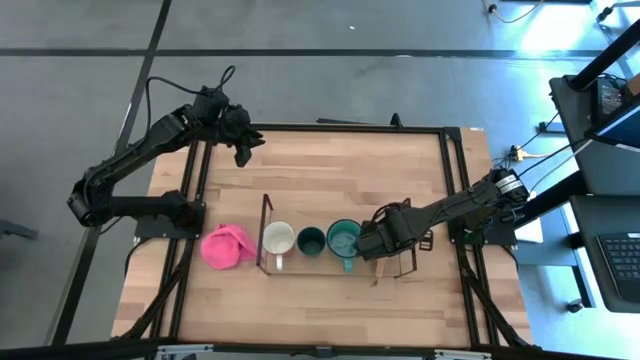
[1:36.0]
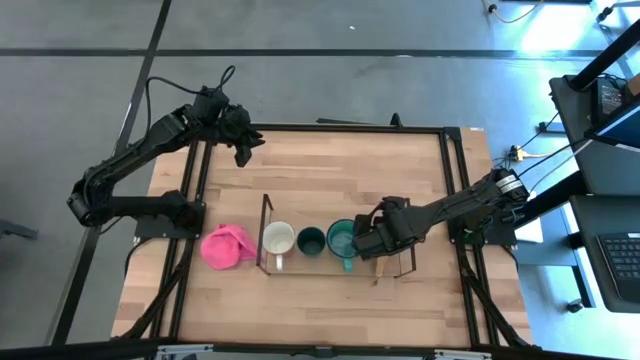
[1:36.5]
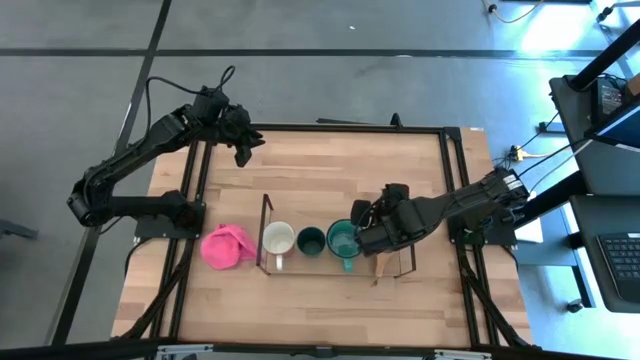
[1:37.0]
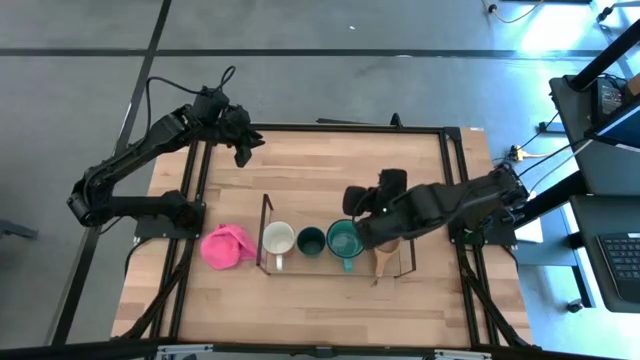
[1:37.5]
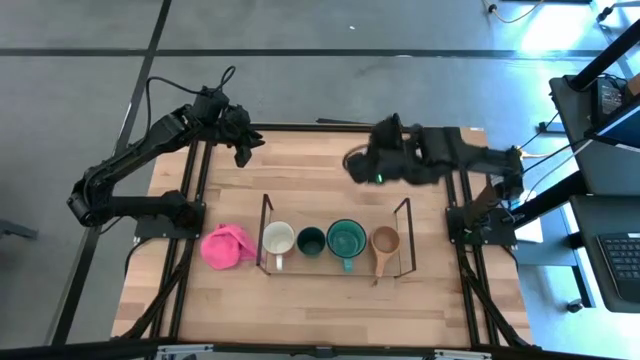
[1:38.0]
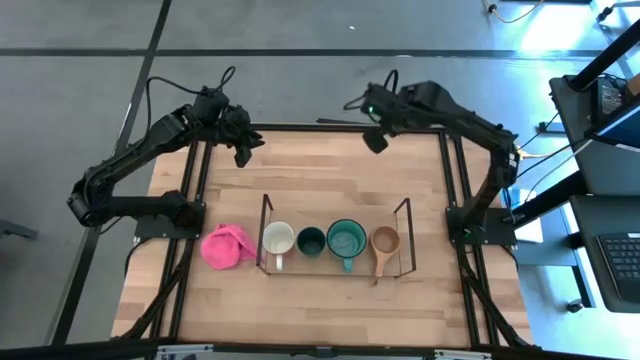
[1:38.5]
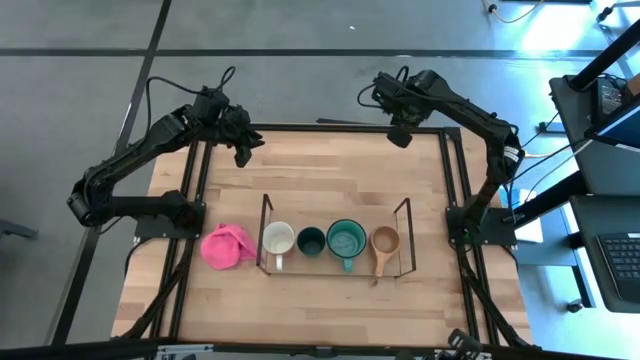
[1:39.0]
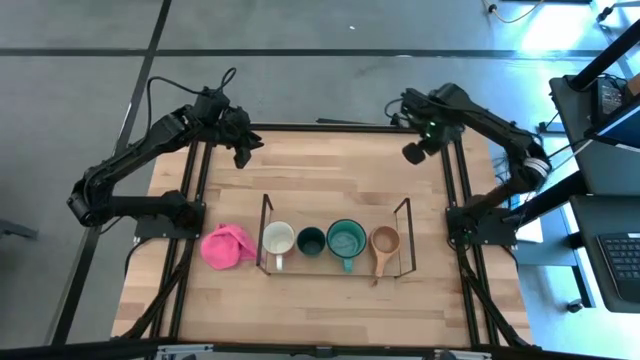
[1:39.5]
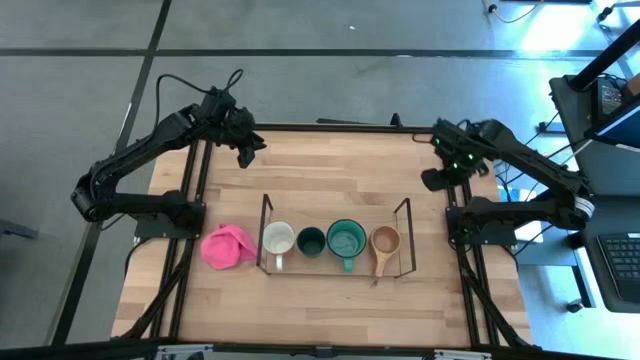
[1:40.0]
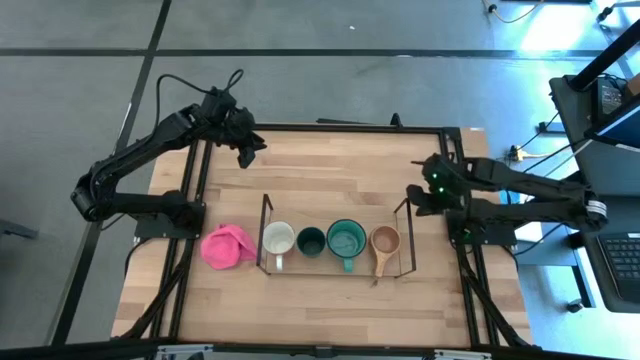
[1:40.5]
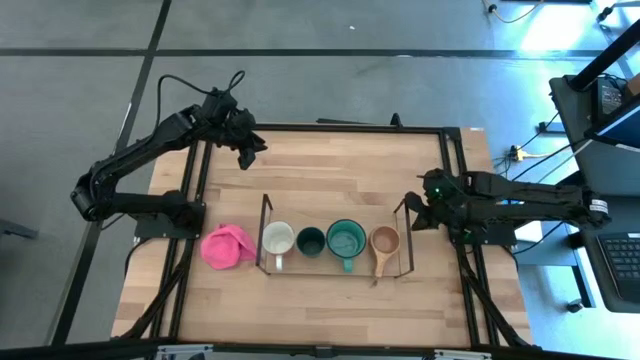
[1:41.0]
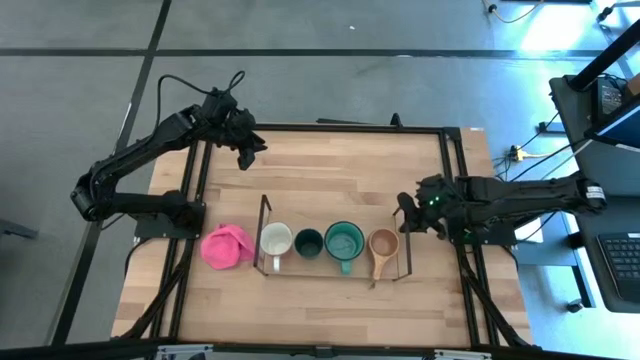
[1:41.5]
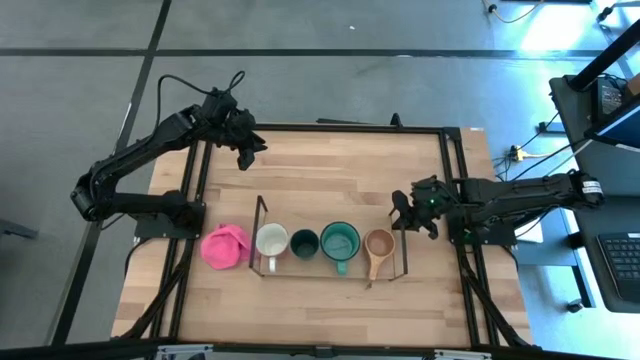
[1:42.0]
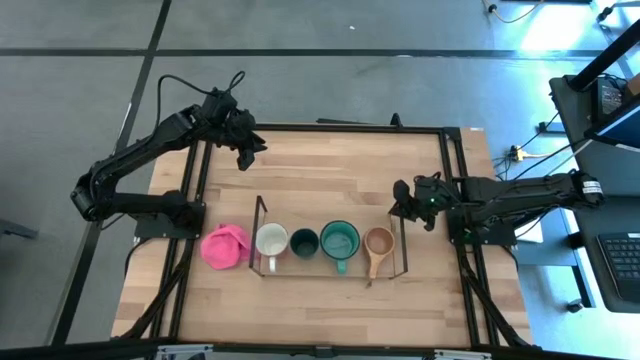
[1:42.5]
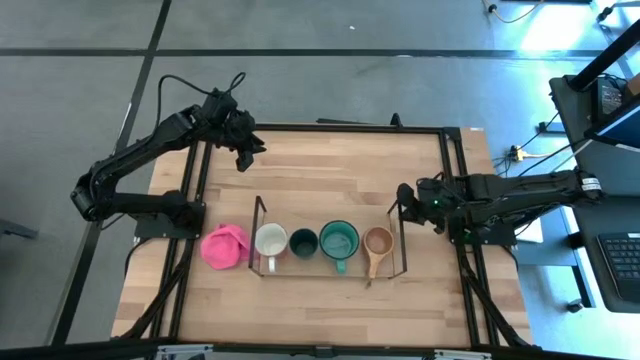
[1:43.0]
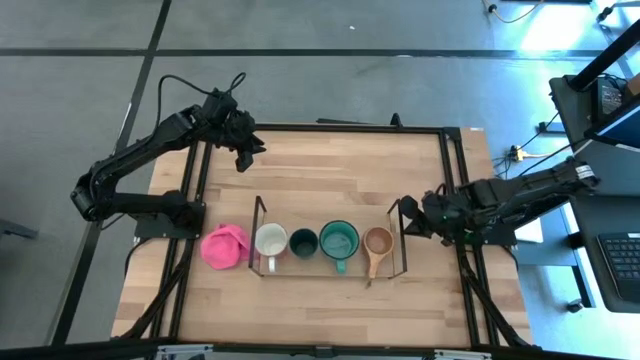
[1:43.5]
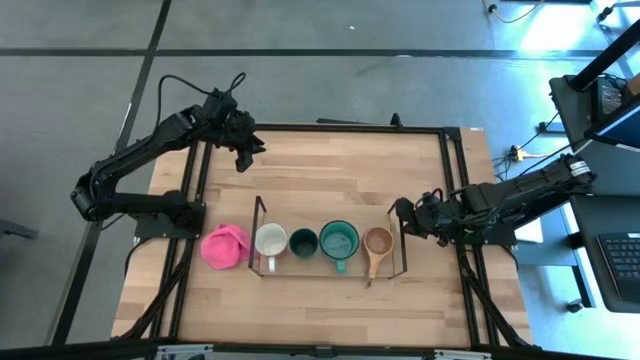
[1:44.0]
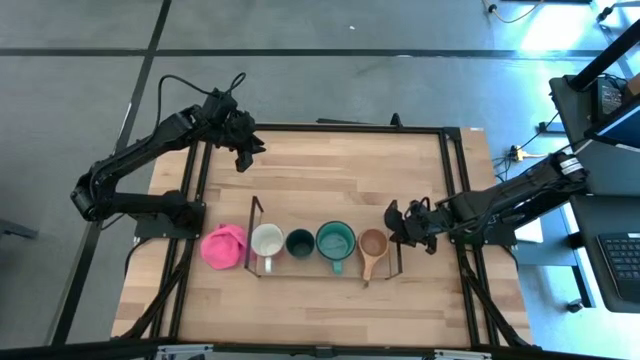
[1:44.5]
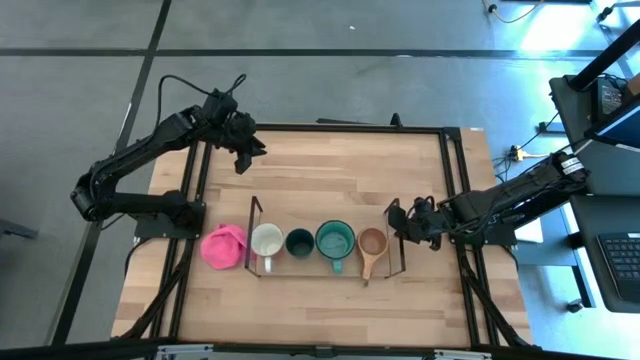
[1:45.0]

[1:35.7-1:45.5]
Task: Stack small to large cups/mugs on shelf
Adjust the shelf

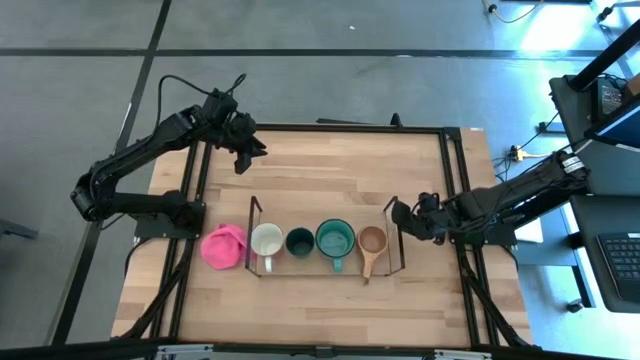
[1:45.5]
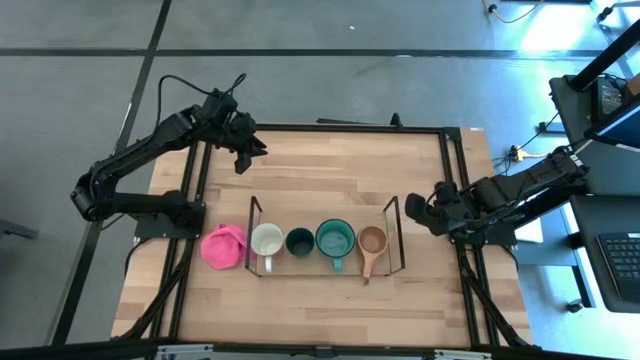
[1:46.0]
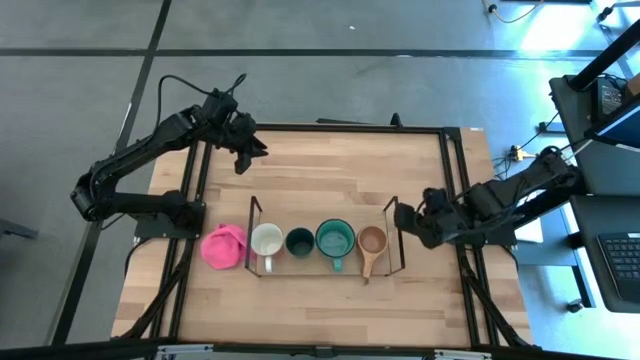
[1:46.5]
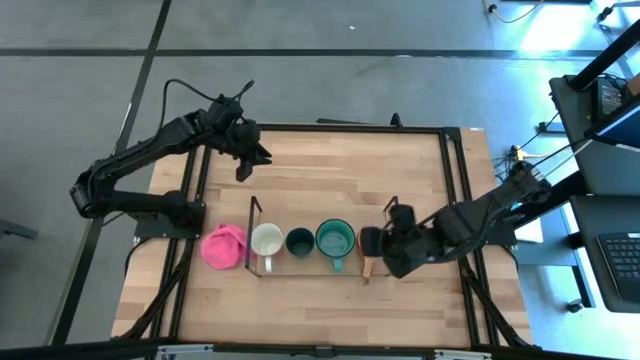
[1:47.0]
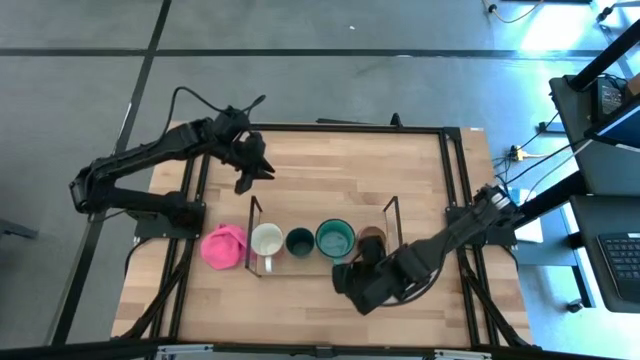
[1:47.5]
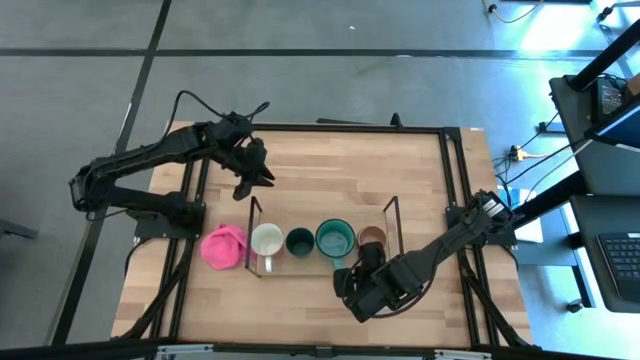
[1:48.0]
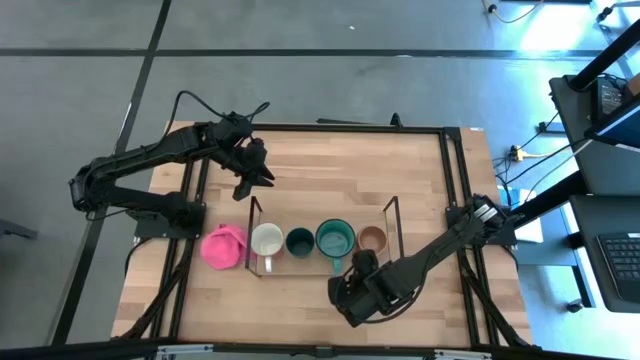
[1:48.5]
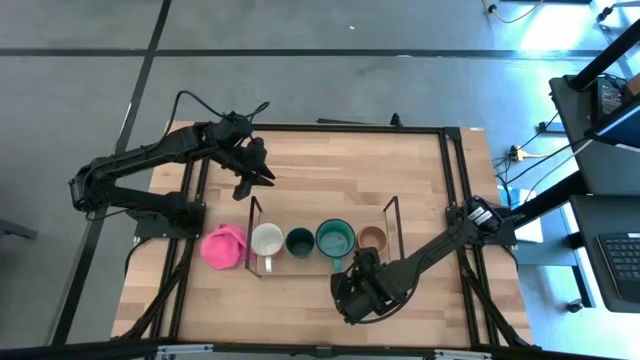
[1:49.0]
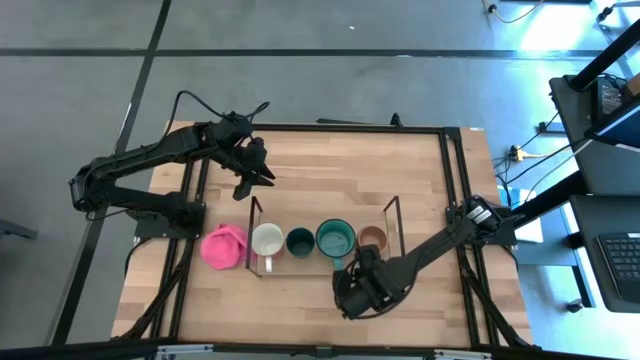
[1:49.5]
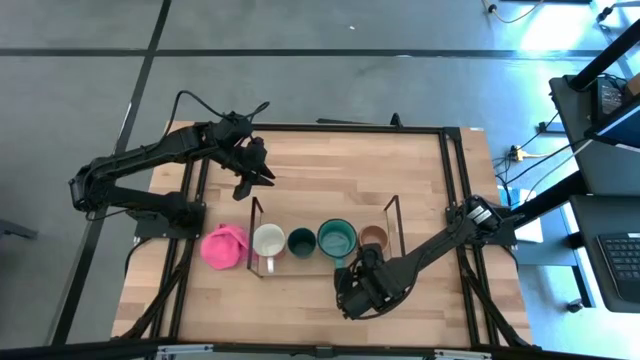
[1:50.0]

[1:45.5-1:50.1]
Adjust the wooden mug on the shelf

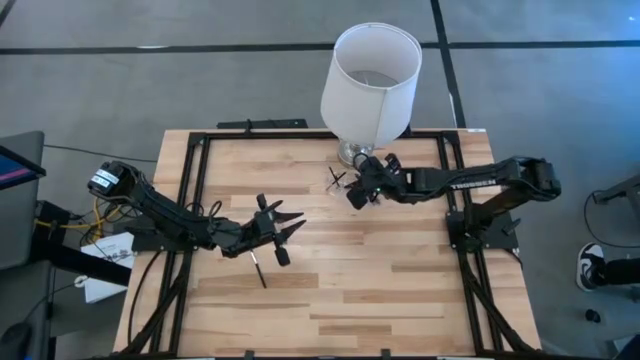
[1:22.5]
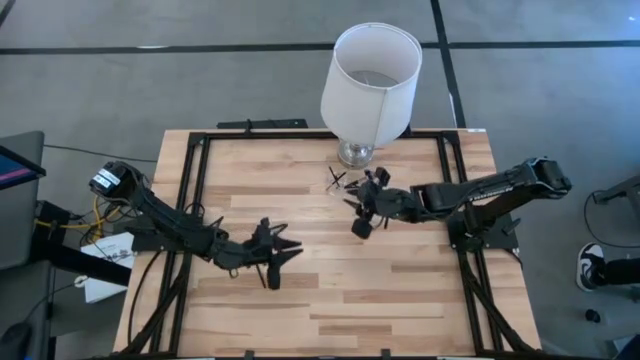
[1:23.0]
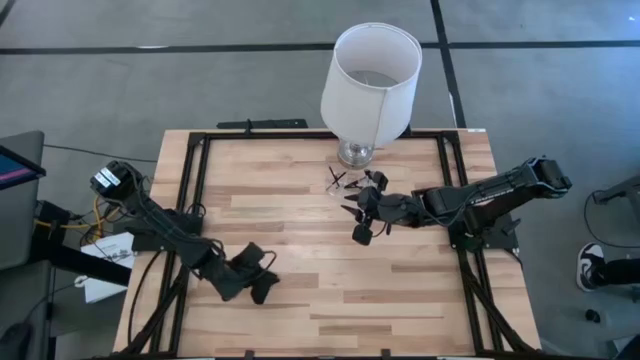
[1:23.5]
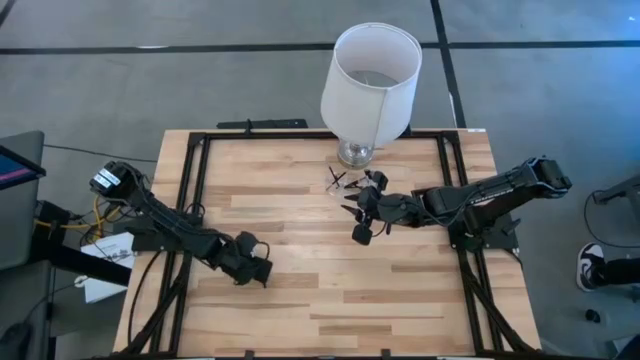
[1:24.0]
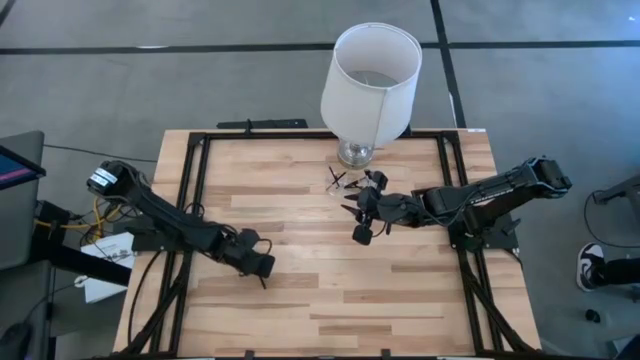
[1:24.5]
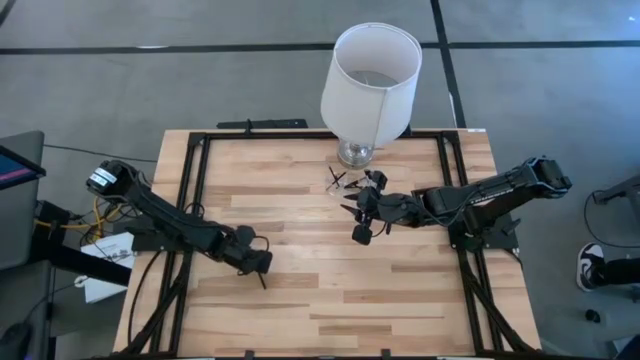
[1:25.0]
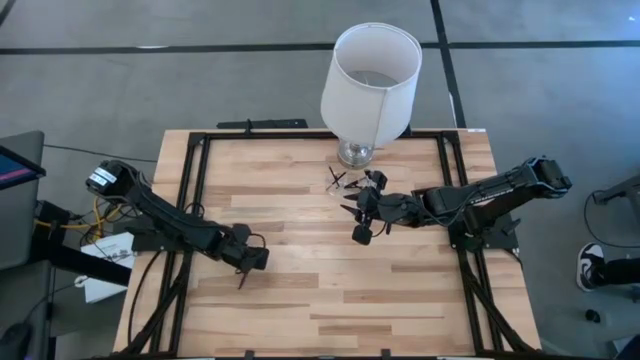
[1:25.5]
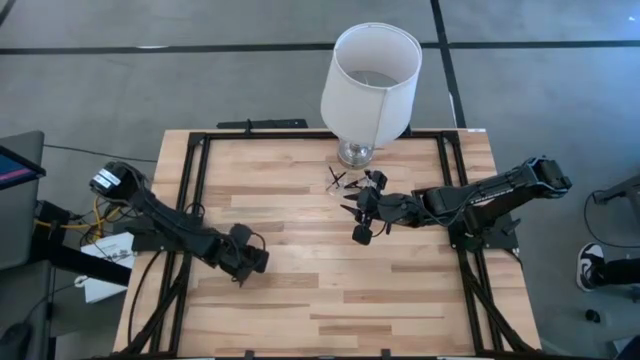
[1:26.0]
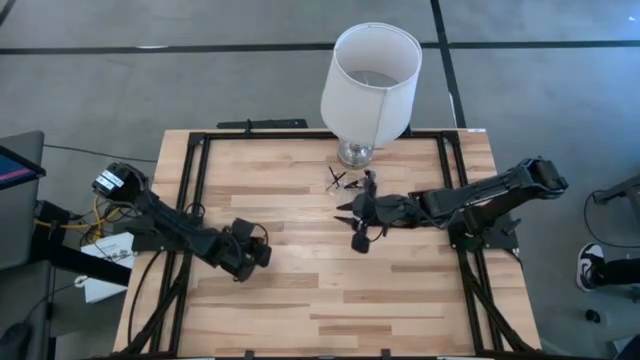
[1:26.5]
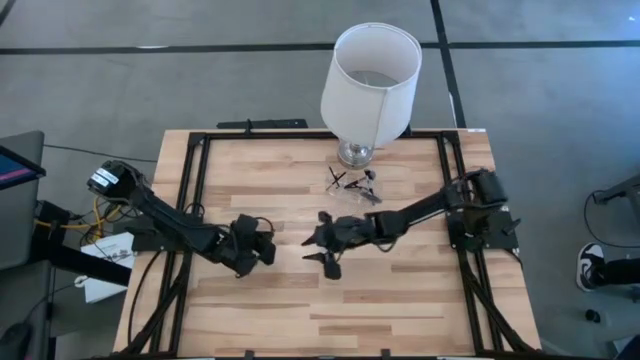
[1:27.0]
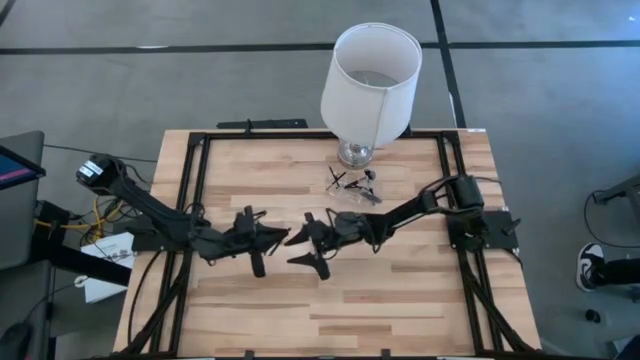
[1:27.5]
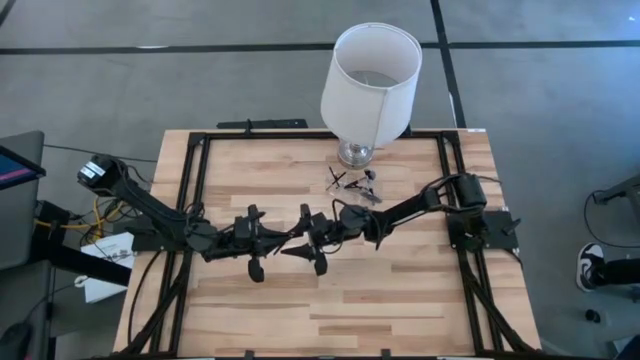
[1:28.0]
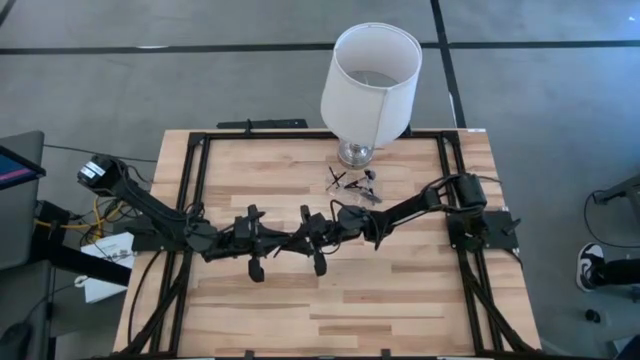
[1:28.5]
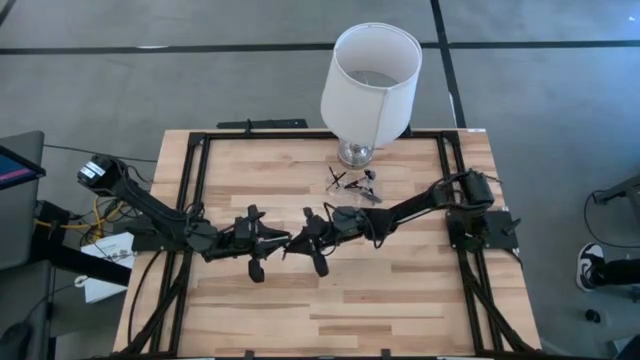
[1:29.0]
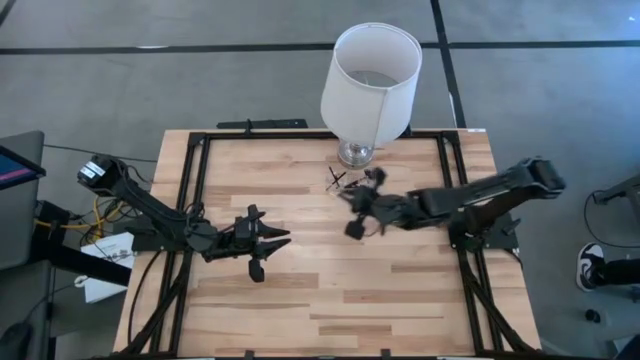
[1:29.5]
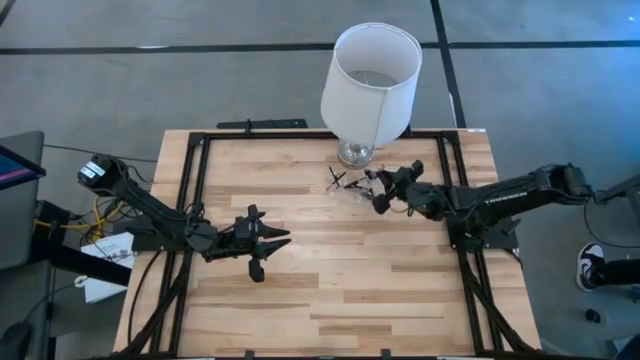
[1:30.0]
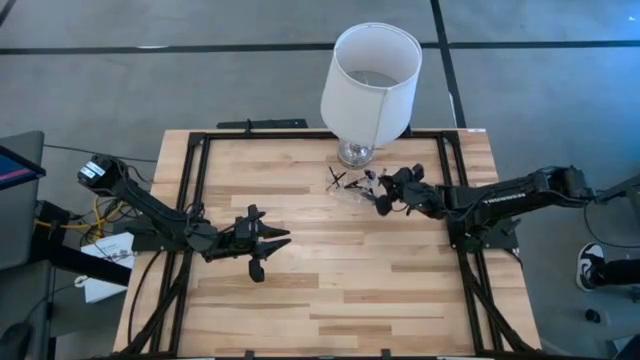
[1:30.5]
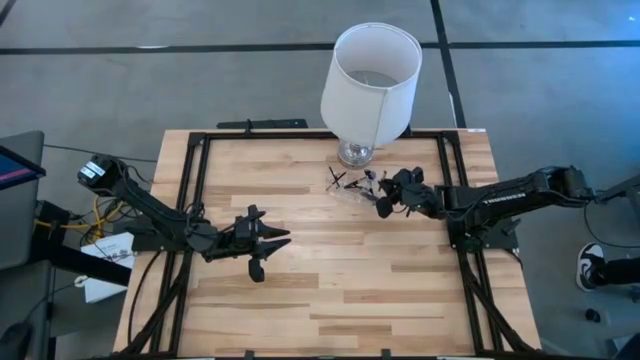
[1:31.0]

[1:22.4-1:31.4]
Task: Put items in baskets/containers
Put the black eyeshadow brush into the transparent organizer
